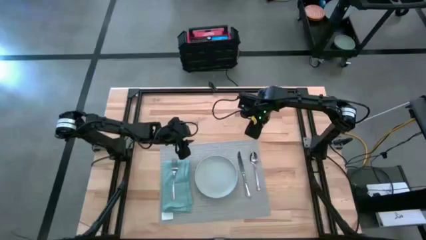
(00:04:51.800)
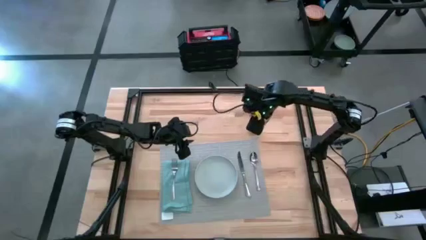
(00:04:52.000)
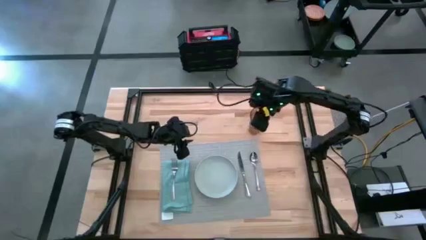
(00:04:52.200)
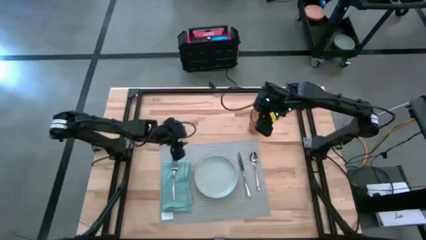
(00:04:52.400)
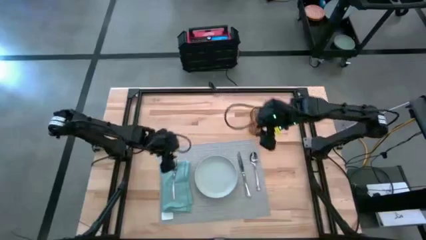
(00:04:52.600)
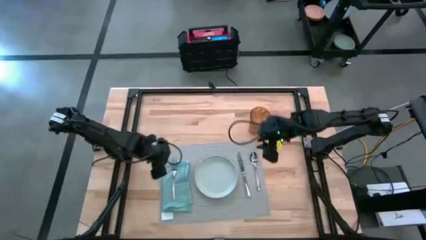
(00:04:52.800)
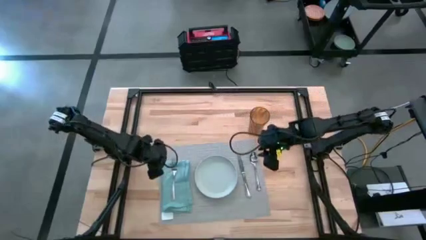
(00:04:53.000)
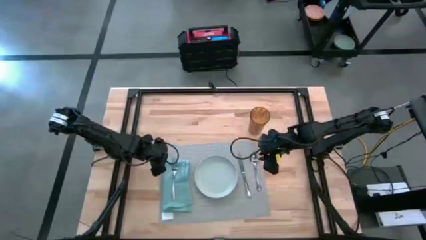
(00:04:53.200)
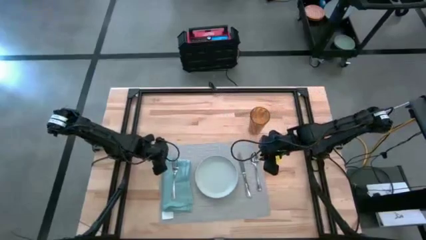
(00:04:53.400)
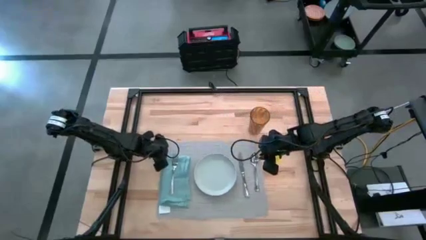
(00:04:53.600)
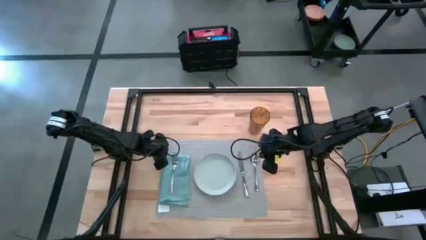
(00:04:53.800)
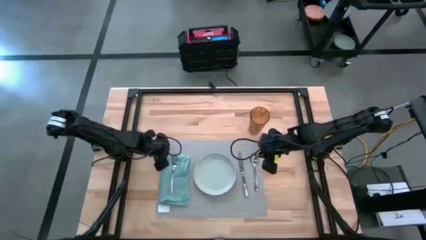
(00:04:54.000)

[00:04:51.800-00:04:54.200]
Task: Set table place
Adjust the gray placemat

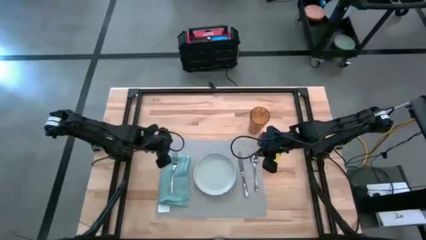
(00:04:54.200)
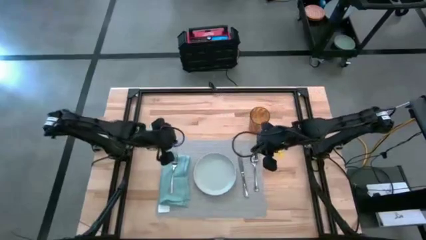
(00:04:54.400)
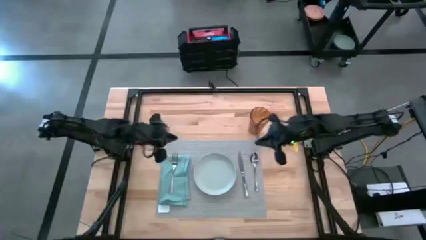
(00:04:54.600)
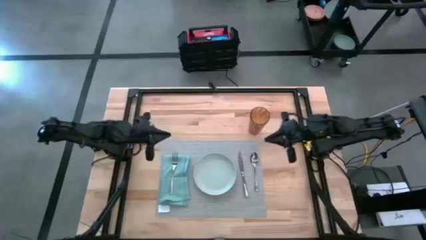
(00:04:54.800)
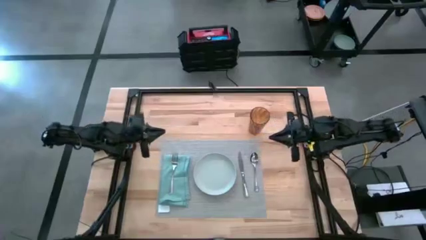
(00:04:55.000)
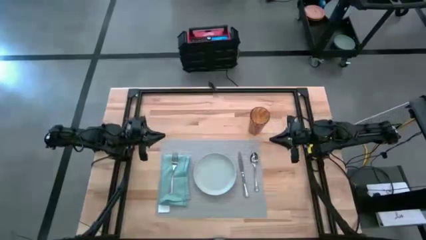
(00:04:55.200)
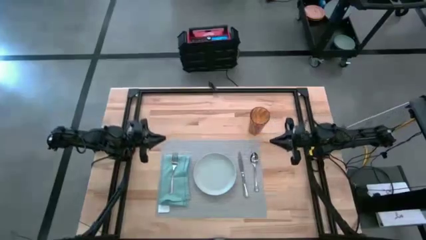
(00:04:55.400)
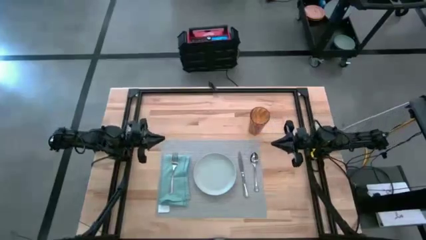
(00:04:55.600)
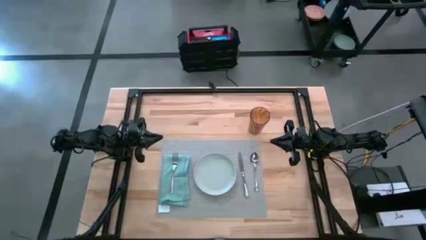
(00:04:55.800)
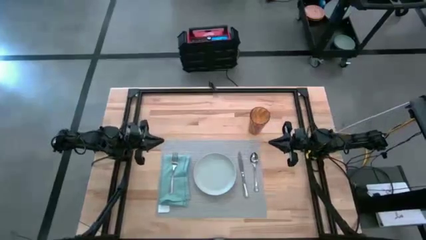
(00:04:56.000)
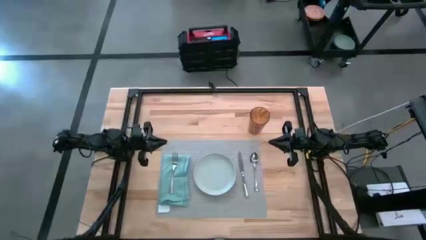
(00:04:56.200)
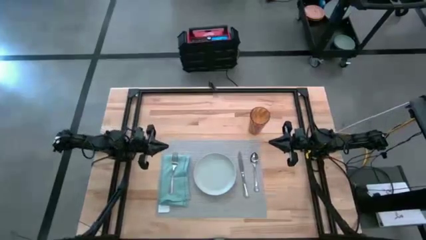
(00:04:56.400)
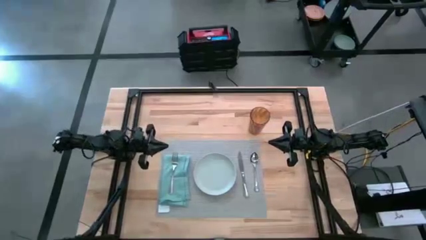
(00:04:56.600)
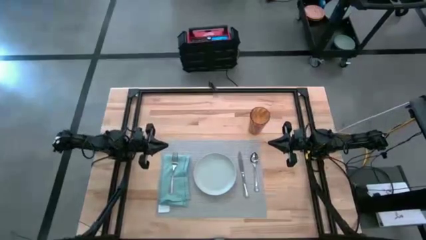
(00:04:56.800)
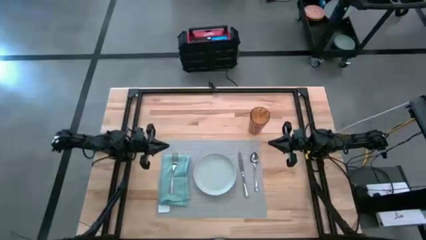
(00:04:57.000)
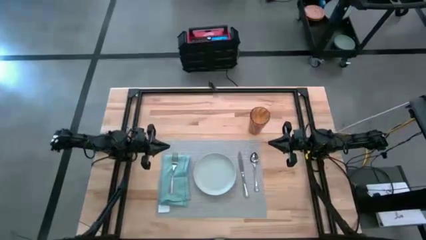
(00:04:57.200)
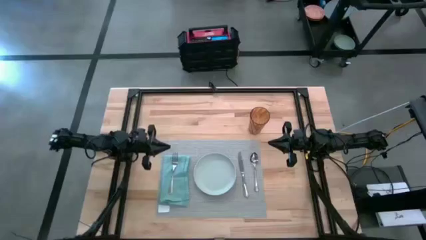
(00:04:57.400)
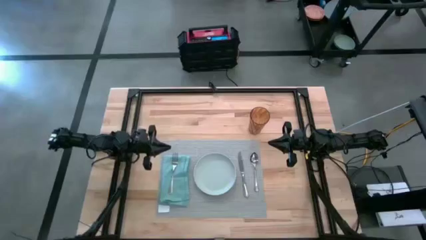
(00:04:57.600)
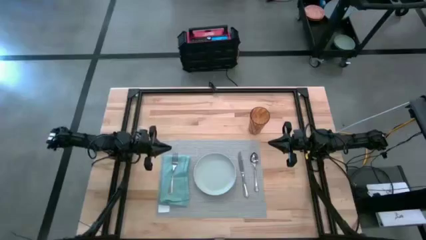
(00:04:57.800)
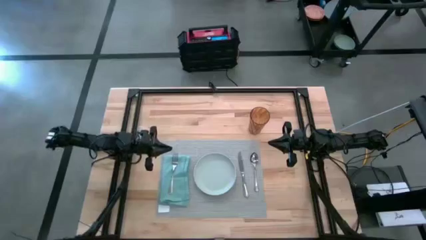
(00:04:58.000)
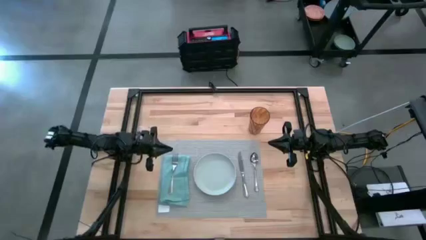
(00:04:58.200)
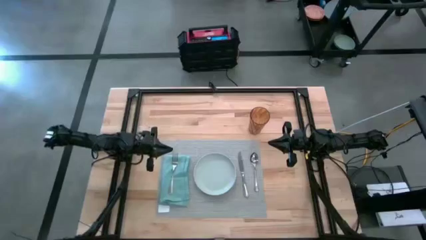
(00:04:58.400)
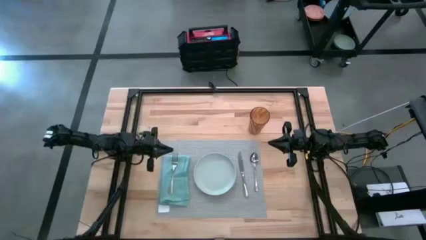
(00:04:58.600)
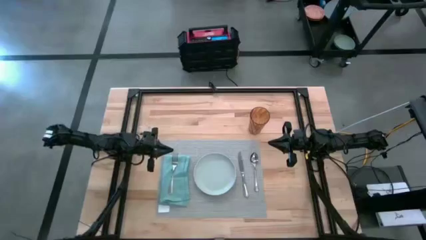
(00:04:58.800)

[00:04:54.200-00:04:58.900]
Return to Home Position

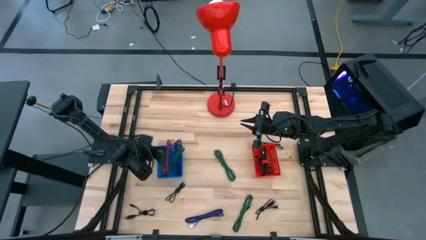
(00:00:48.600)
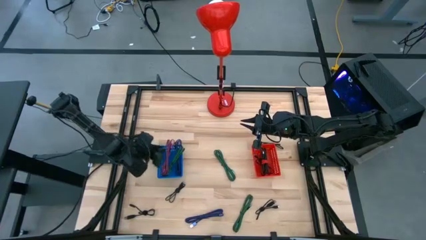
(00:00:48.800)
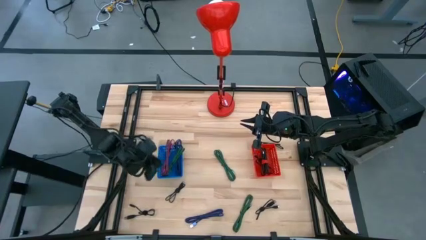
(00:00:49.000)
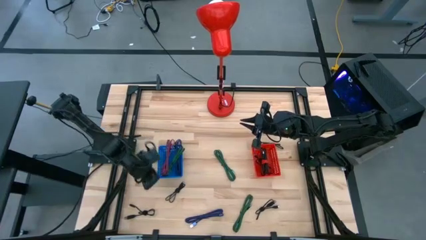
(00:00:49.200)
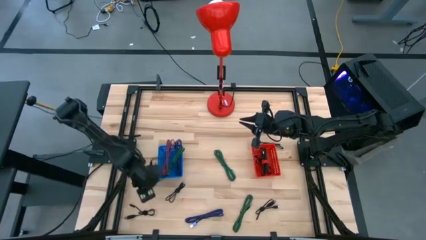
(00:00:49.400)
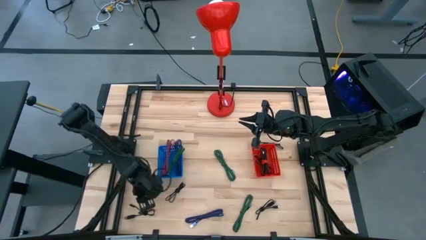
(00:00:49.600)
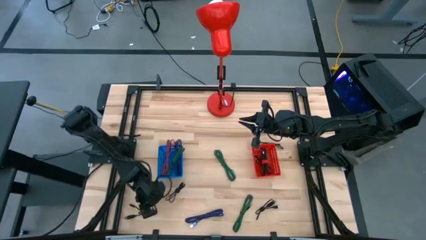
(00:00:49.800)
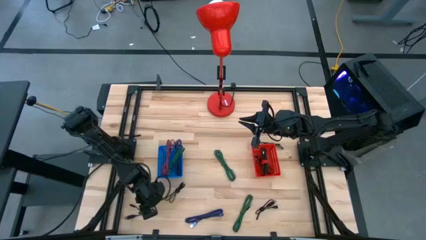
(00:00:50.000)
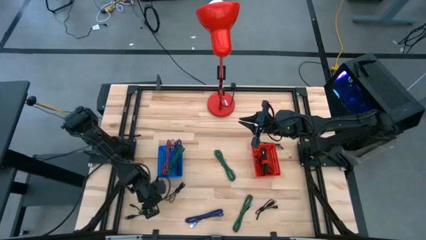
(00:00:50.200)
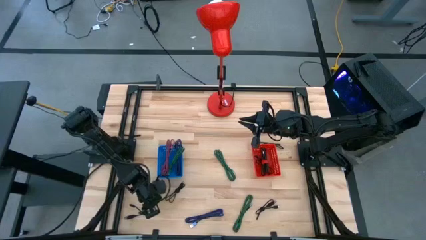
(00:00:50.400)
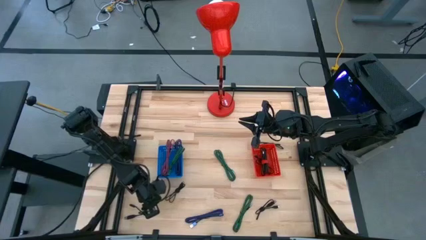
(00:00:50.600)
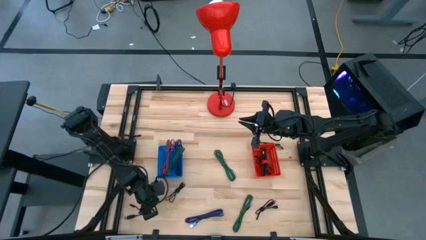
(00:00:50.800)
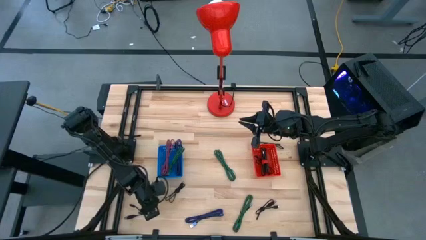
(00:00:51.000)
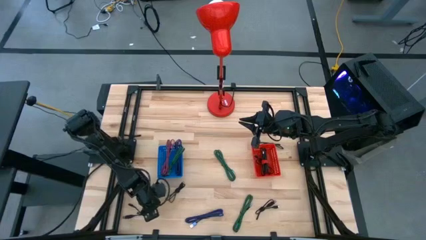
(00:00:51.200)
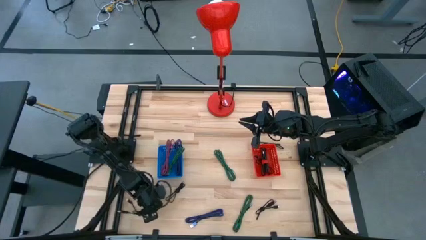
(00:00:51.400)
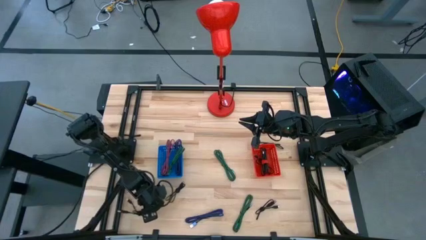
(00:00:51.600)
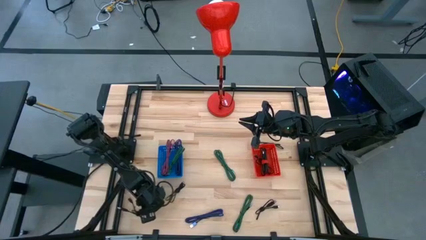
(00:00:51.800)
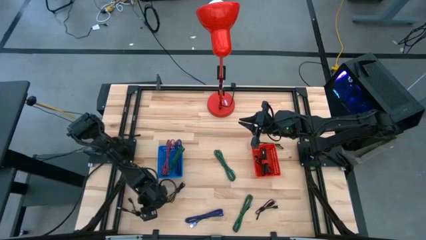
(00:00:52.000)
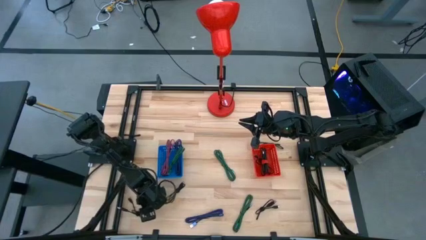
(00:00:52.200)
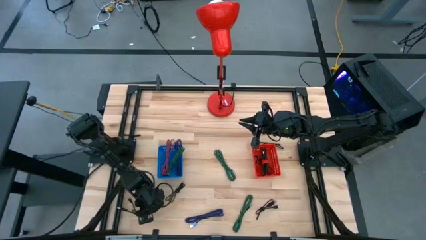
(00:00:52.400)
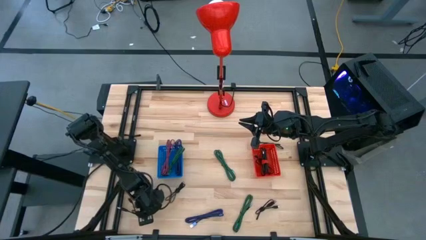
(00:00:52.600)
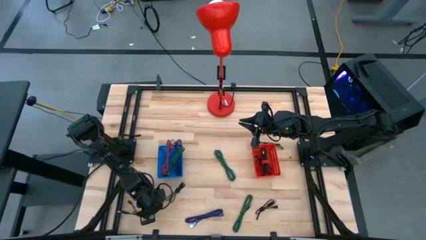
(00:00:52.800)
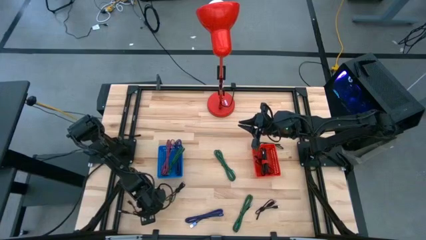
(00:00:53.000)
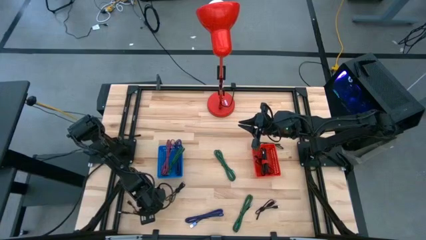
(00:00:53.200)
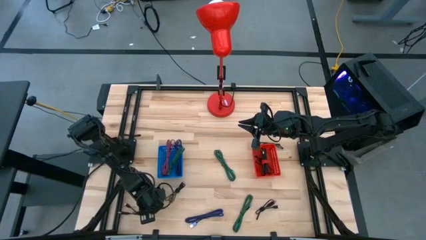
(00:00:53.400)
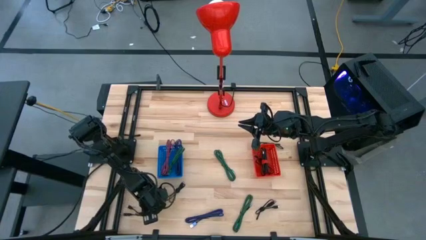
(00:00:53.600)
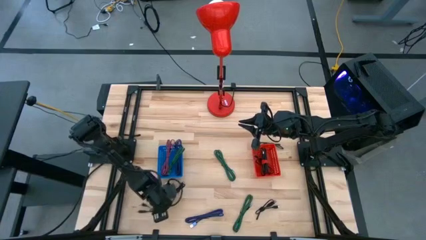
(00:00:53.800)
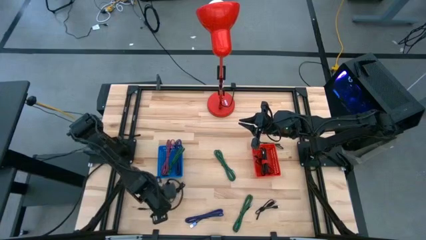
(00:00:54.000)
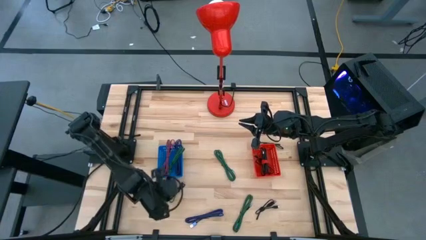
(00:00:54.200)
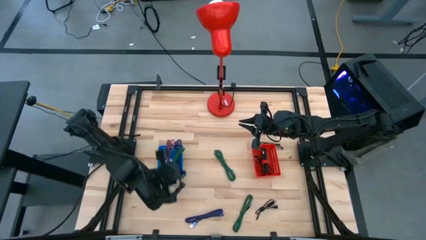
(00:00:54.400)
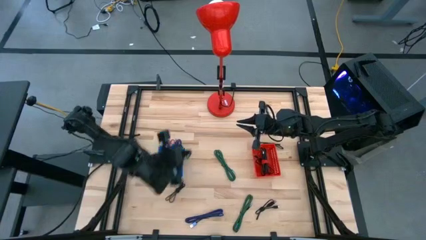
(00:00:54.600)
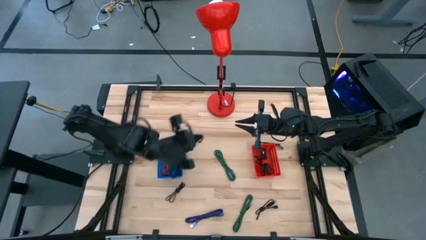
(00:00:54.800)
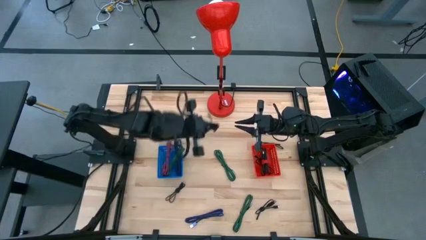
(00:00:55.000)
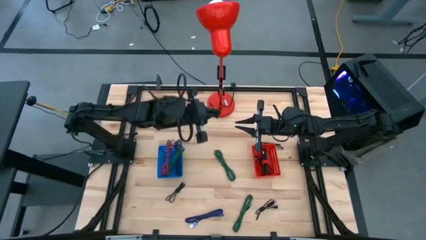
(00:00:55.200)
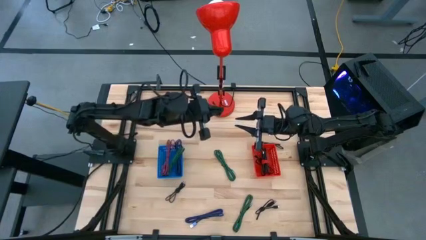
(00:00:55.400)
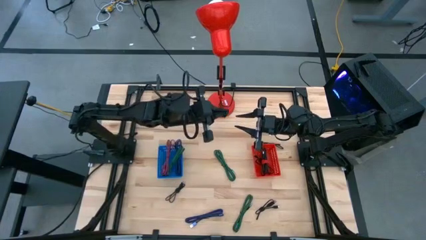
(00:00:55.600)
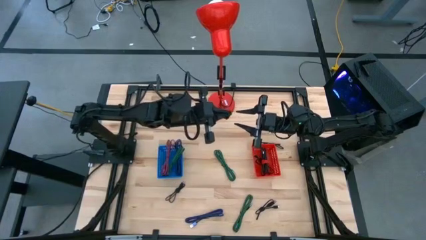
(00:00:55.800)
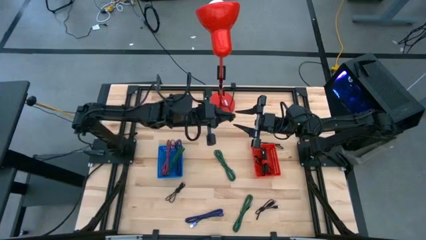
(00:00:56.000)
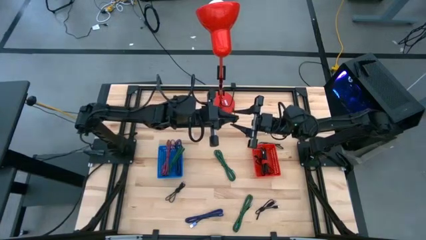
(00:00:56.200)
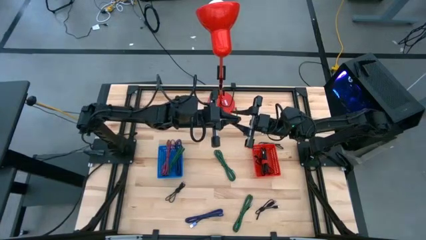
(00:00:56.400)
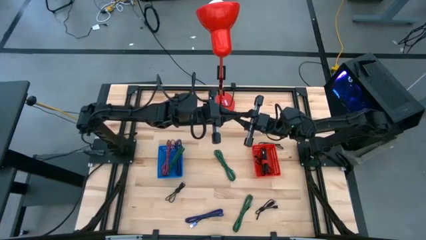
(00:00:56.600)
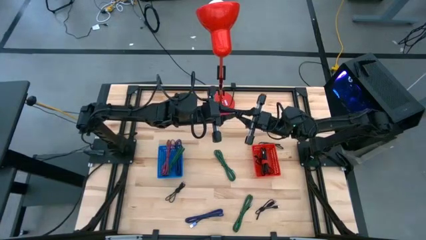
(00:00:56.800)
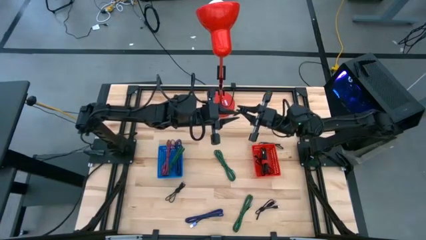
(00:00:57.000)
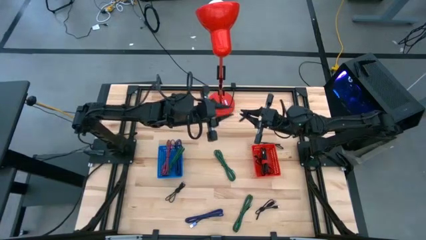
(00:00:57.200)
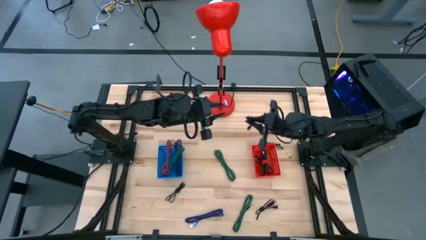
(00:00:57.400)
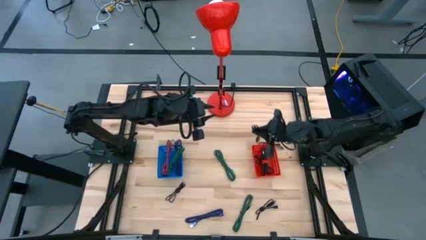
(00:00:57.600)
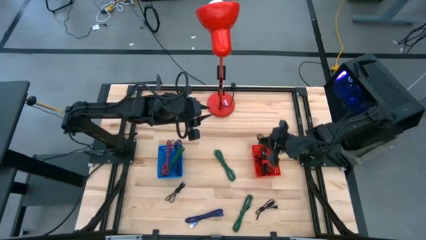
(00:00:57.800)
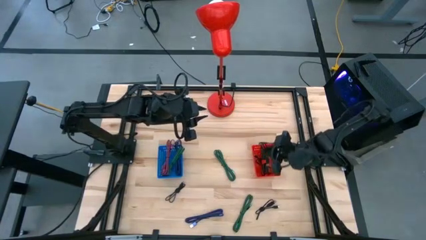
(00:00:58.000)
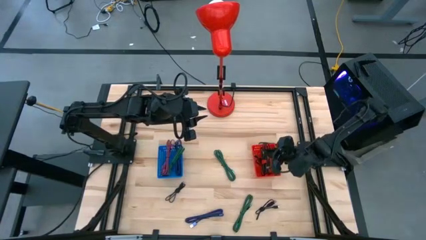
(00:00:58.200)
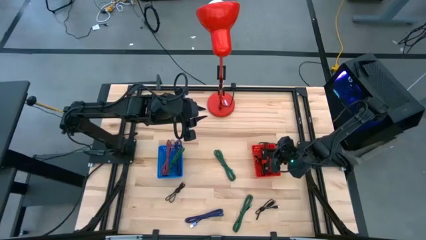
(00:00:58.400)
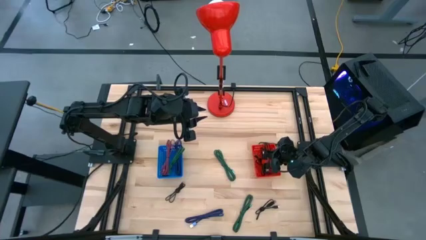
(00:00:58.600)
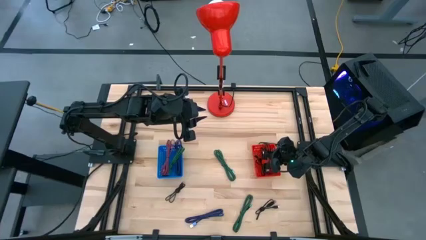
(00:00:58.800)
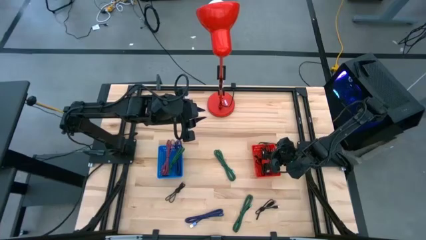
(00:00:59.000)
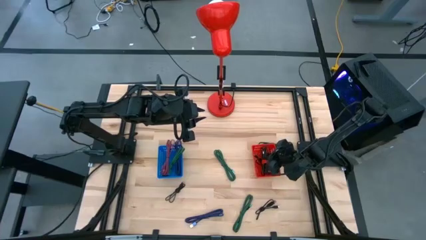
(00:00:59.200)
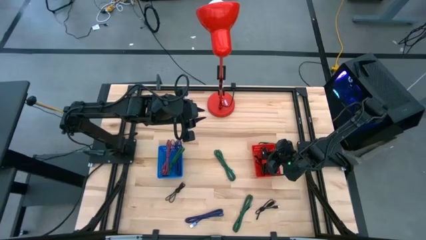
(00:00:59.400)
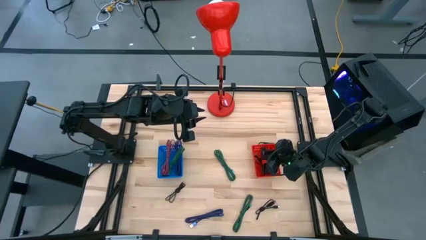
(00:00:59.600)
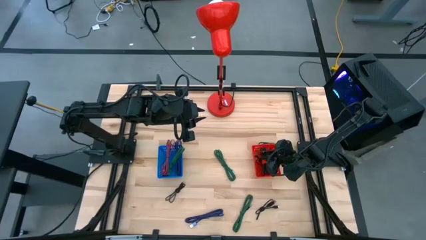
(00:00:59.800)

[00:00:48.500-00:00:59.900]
Task: Pick & Place USB Port
Put the black charger cable into the red bin
